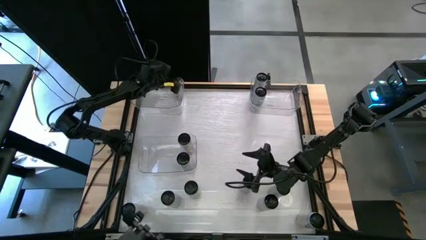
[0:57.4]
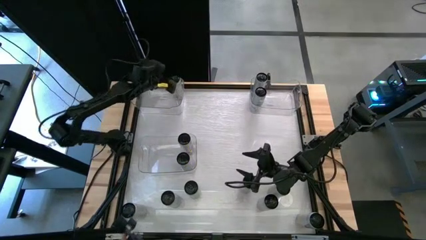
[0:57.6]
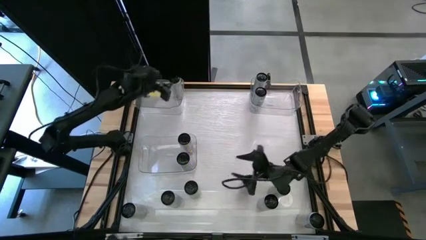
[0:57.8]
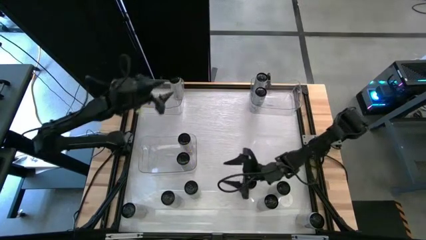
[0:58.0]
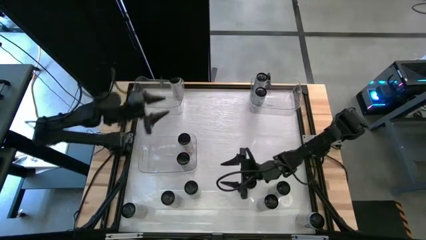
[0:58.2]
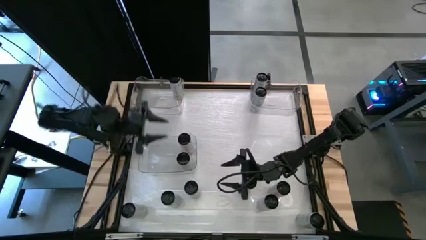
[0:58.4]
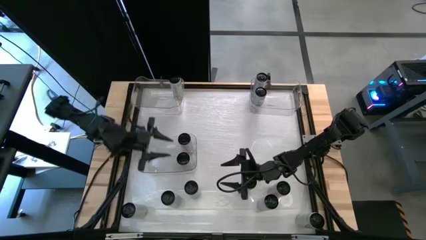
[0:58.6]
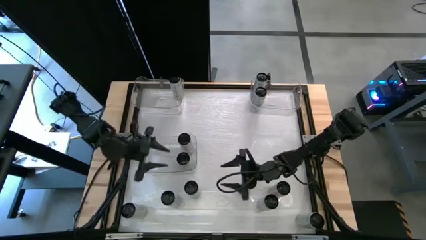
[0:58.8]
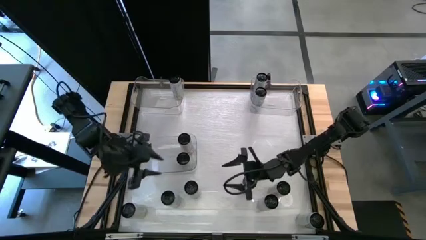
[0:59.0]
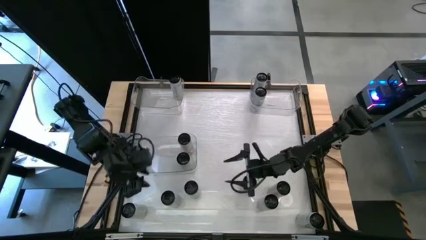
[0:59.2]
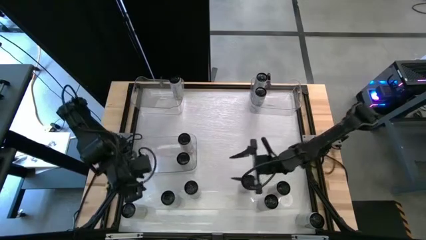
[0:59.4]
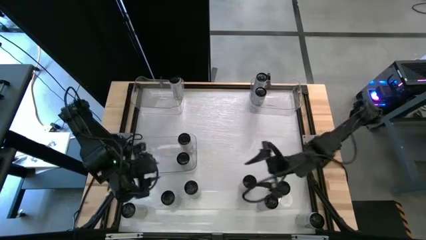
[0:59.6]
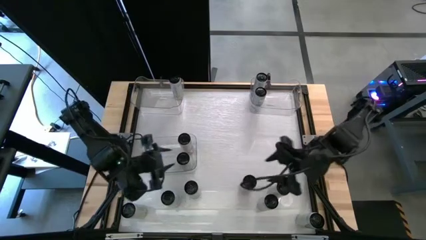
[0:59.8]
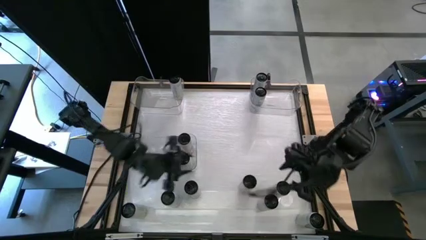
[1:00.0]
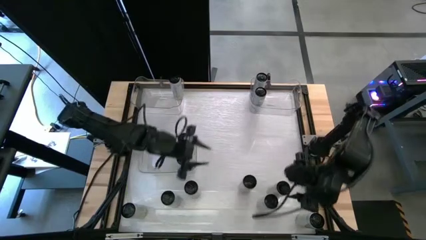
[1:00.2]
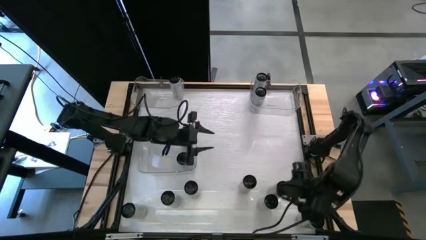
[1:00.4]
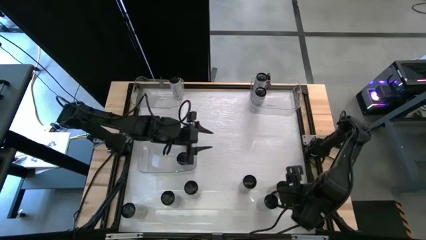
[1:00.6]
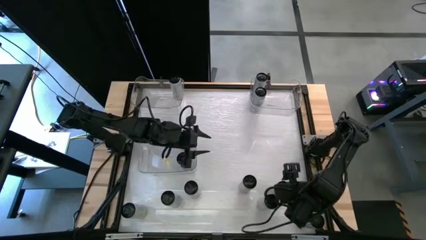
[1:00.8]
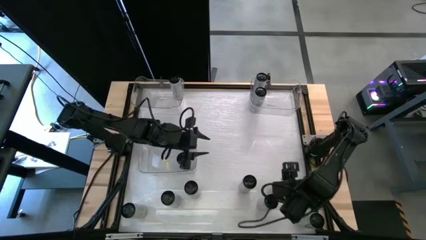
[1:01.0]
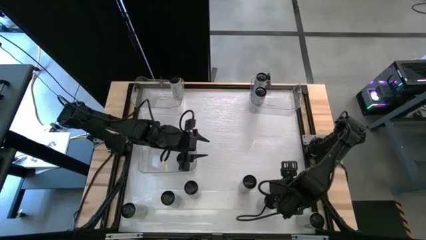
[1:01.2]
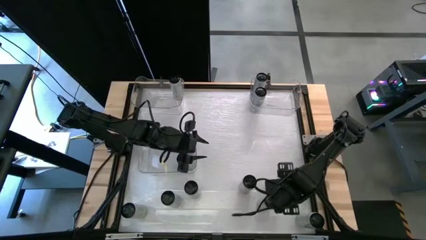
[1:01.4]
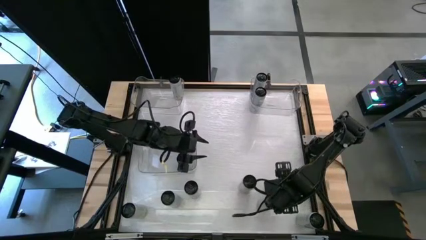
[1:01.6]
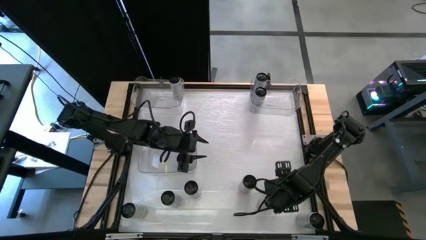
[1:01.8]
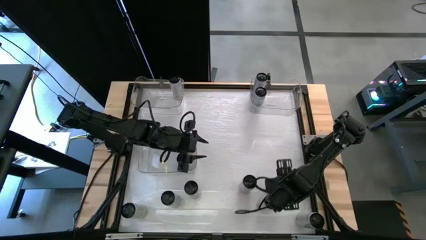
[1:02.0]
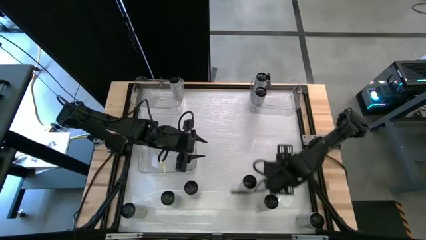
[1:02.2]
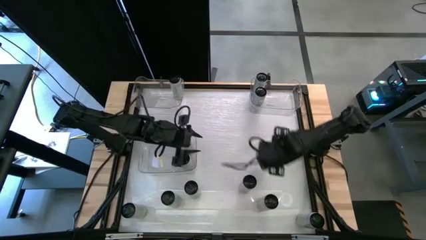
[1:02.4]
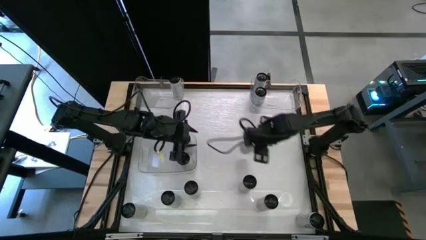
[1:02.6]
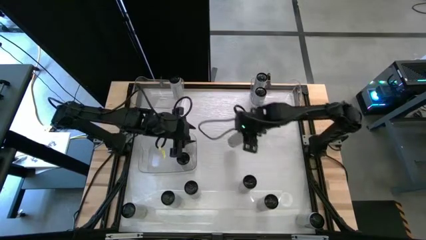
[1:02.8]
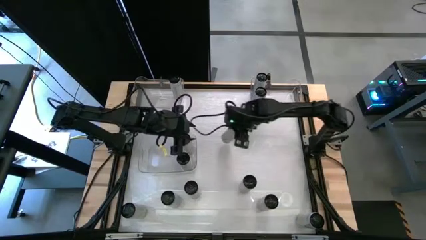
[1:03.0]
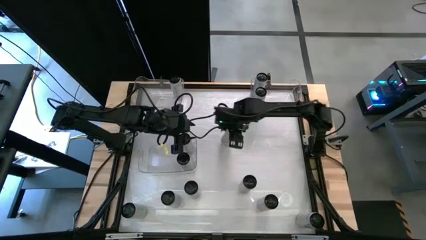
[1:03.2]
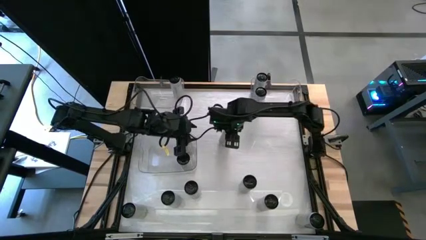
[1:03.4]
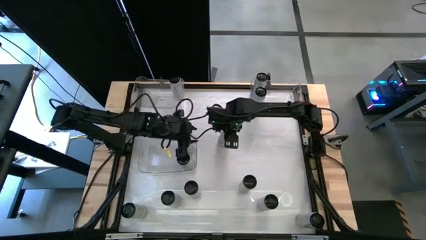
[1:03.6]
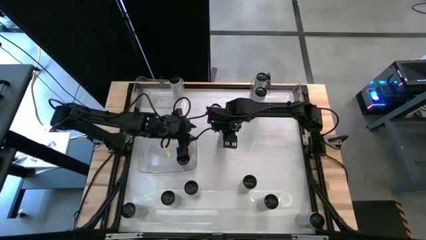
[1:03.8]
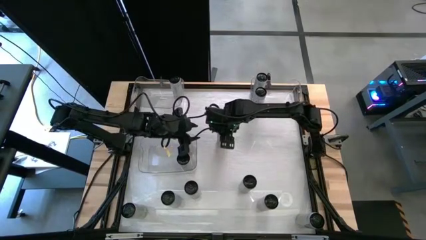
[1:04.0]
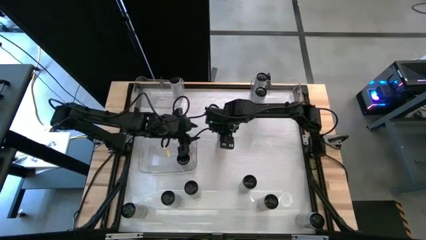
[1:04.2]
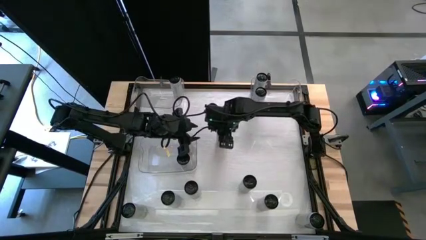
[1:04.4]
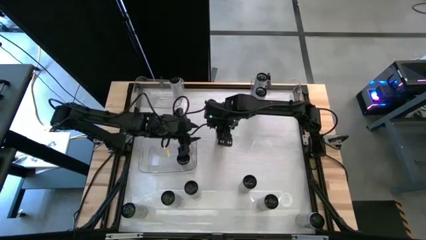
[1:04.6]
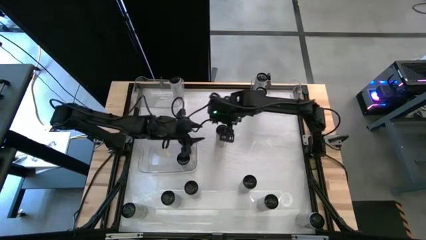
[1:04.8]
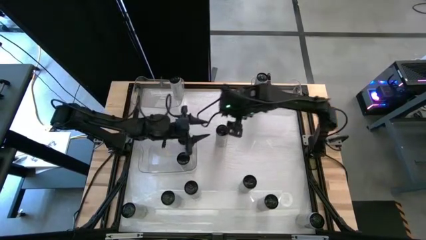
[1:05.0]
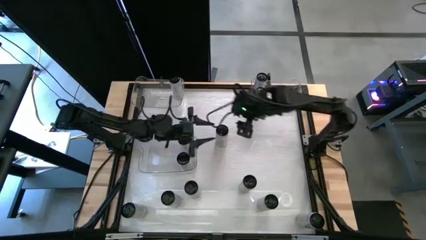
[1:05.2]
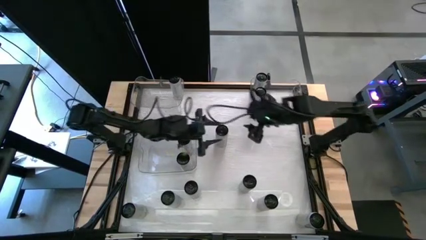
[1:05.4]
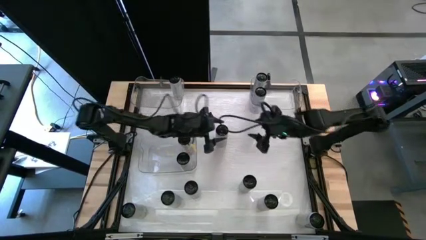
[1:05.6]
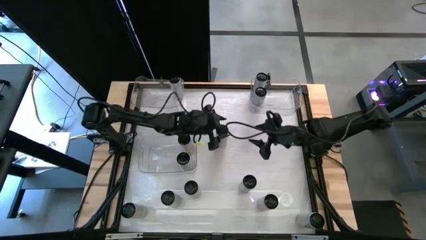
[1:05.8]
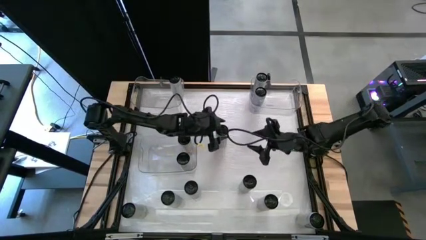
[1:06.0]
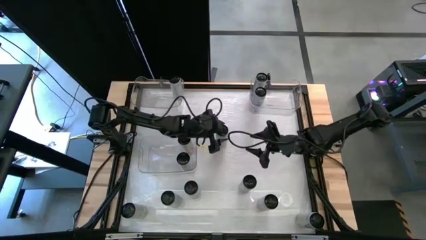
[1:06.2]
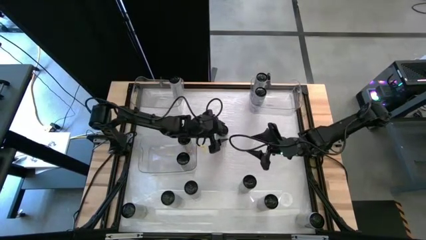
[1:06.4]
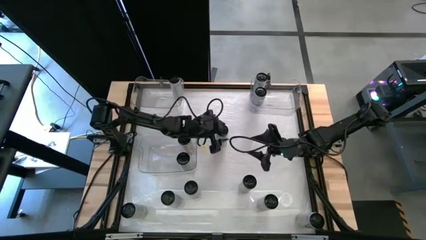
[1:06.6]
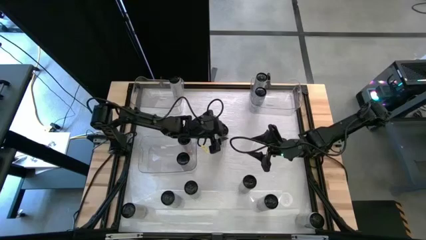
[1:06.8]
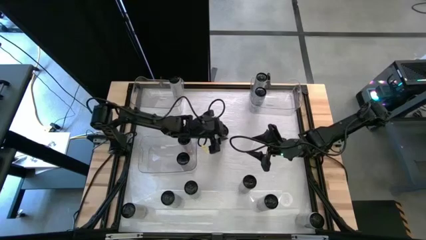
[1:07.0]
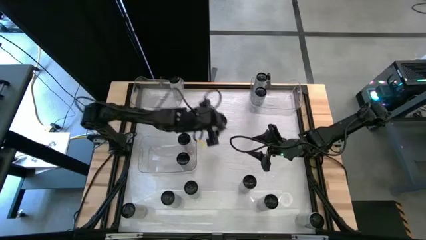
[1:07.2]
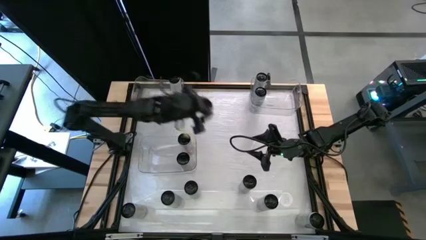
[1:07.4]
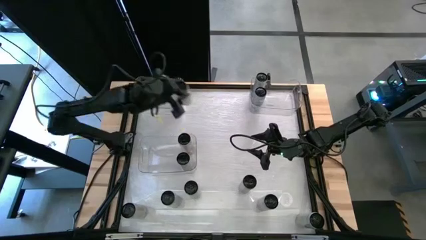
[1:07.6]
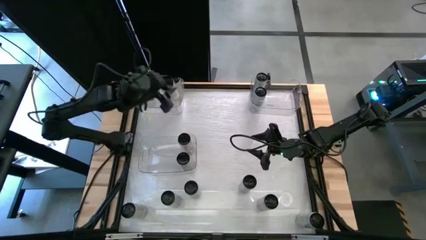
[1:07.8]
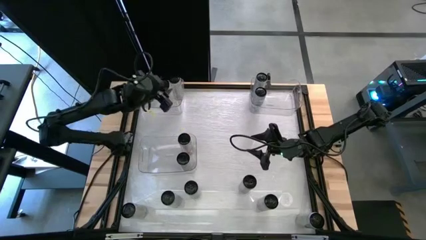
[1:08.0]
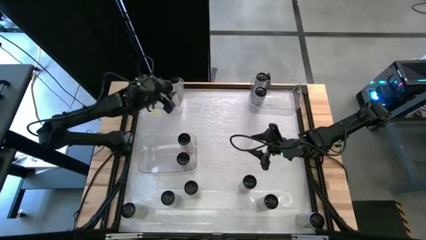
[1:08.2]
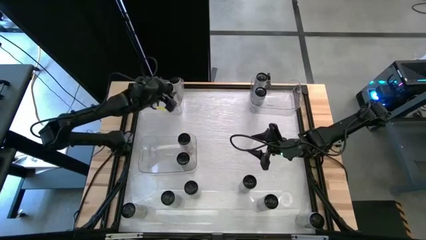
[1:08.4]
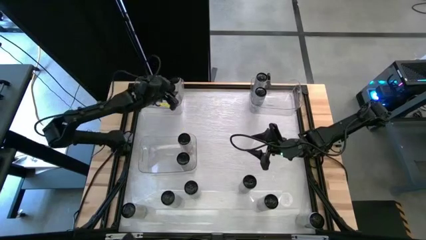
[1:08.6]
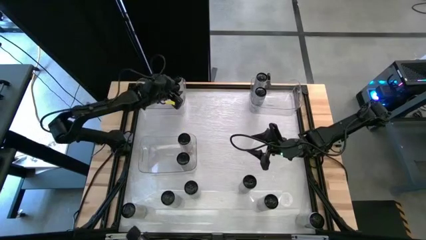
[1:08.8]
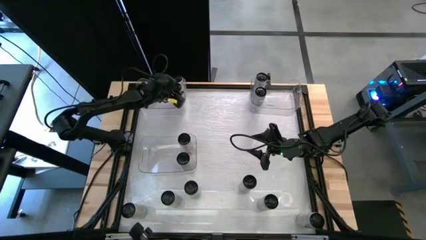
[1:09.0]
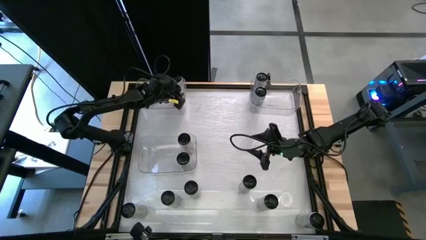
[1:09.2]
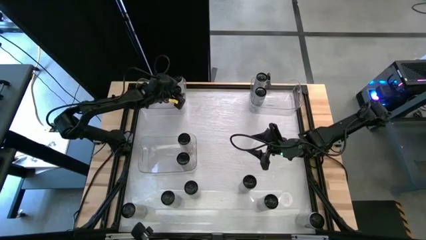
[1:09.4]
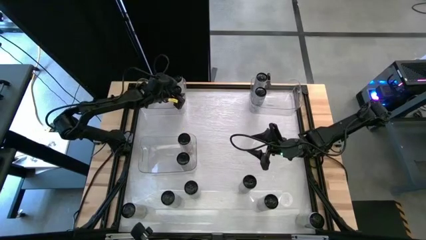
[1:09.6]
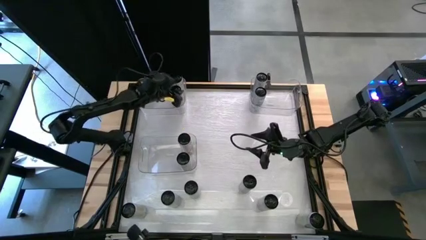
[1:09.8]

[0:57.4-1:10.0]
Task: Sort soda cans
Put the white-yellow can into the top left transparent bin

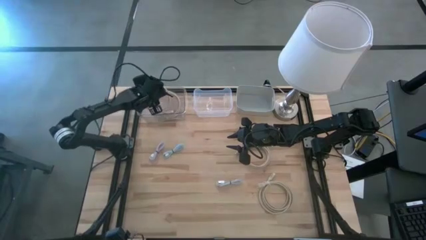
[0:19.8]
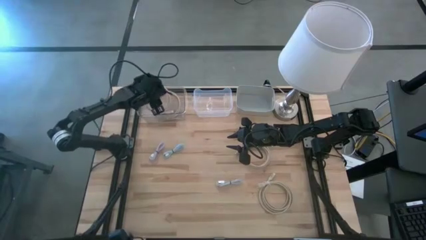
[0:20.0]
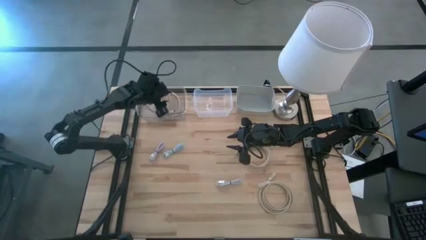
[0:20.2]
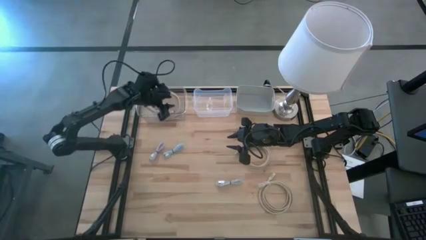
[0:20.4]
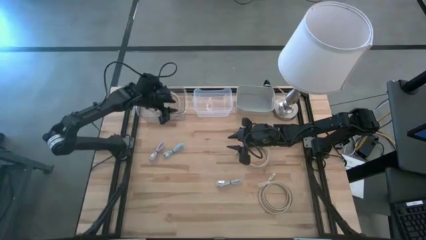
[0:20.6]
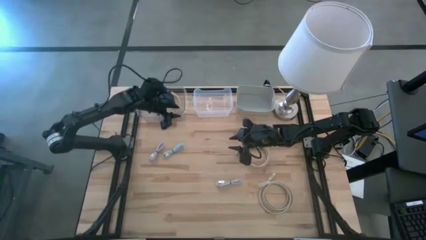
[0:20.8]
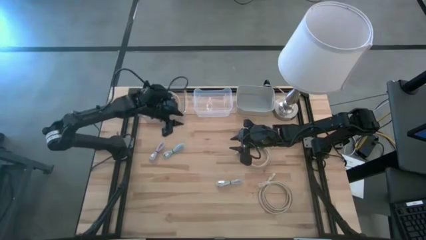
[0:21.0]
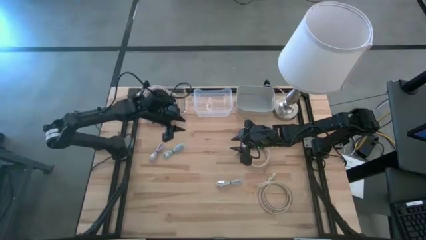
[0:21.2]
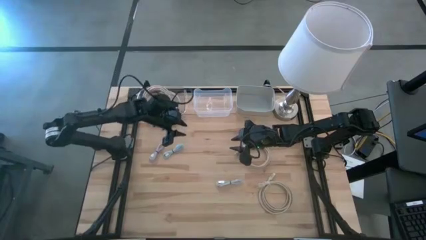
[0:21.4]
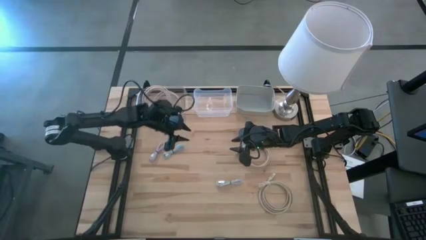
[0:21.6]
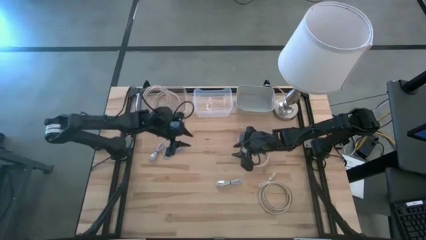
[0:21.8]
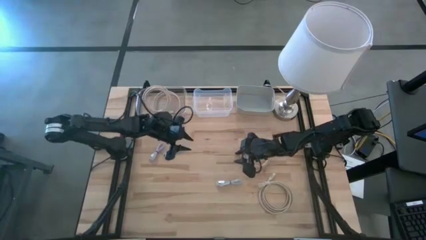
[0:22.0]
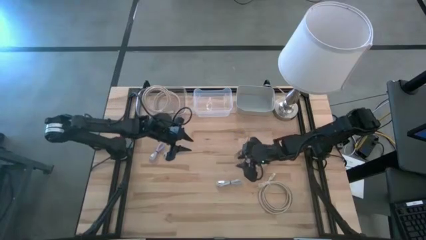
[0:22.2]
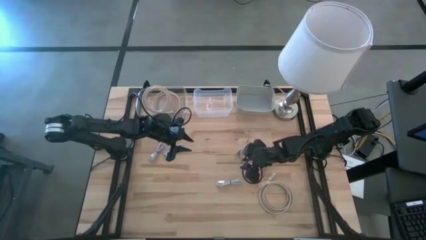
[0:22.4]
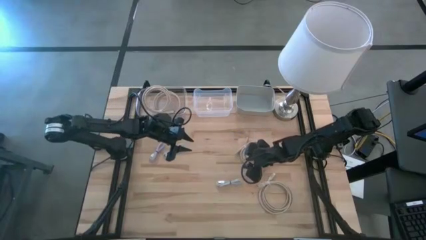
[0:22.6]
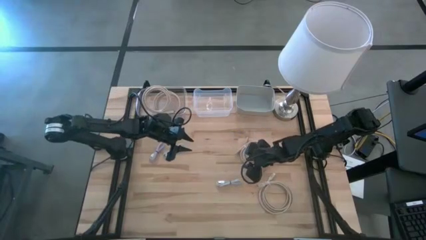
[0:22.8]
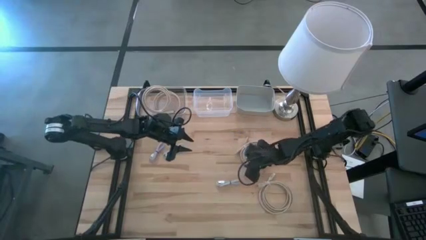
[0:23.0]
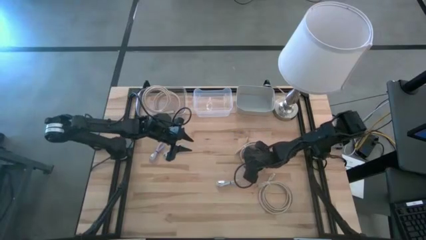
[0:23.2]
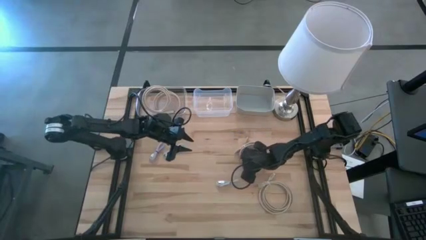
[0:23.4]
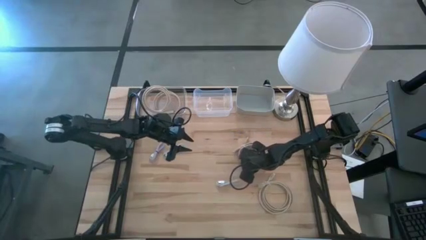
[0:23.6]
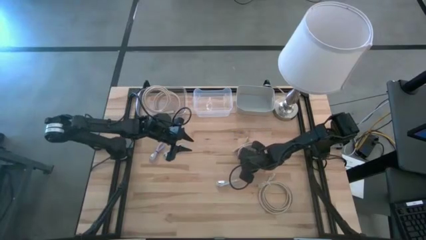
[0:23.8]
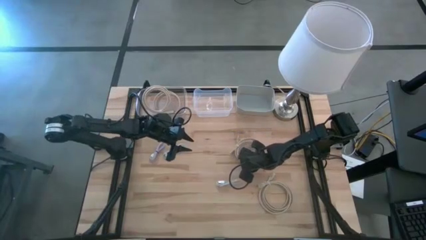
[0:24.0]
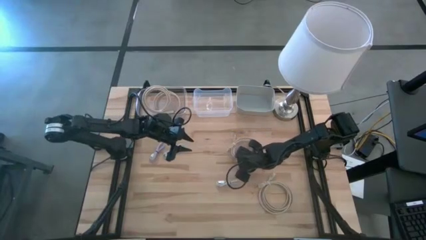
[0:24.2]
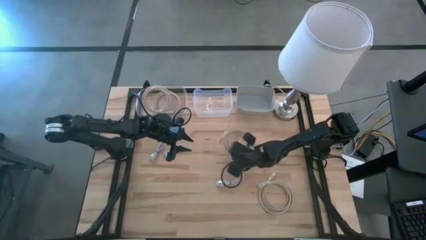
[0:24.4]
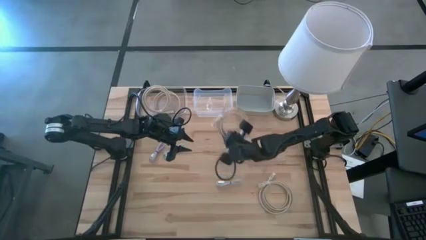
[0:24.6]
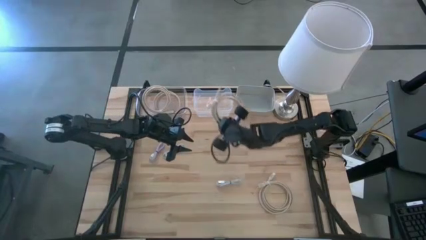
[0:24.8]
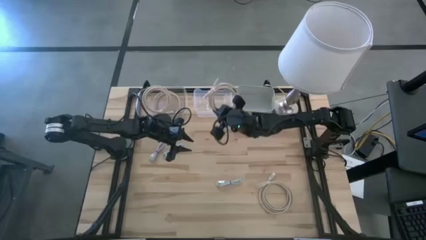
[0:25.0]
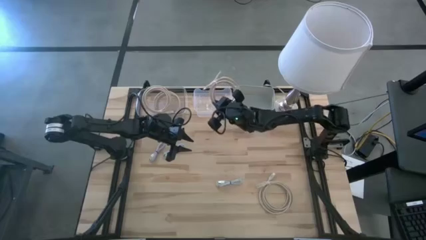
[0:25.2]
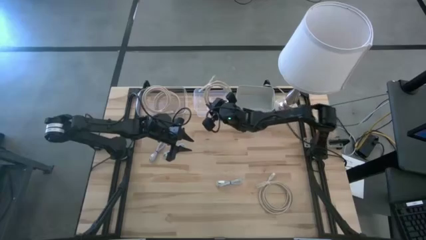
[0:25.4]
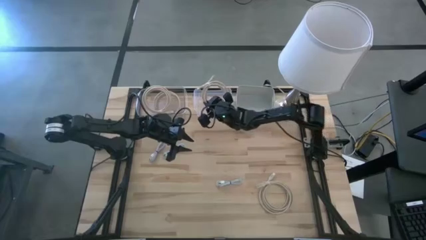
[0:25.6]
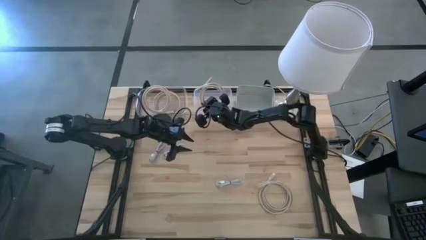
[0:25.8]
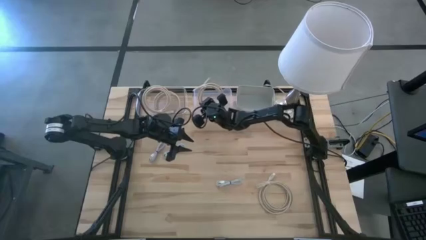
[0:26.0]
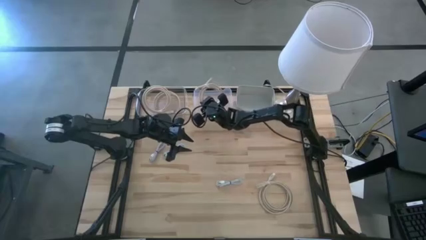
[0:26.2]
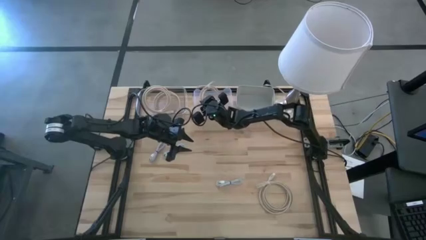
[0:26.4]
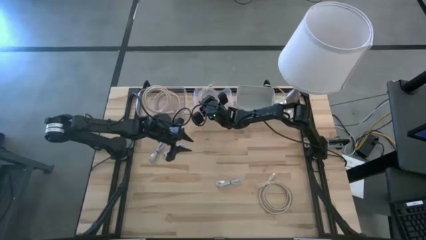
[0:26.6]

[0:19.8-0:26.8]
Task: Pick & Place USB Port
Put the brown HDMI cable into the left transparent bin
